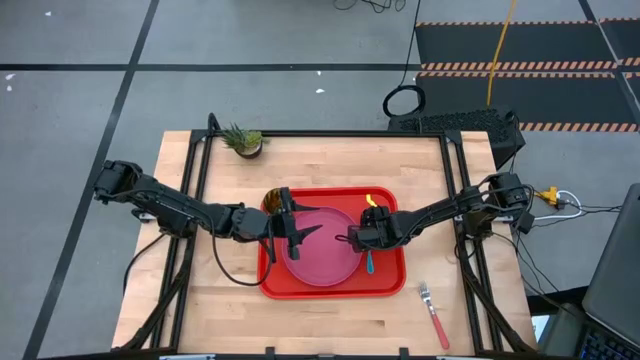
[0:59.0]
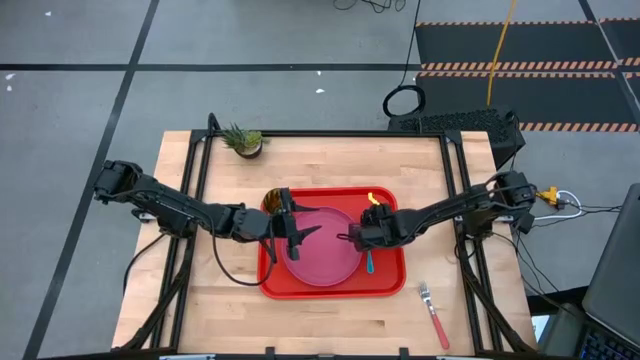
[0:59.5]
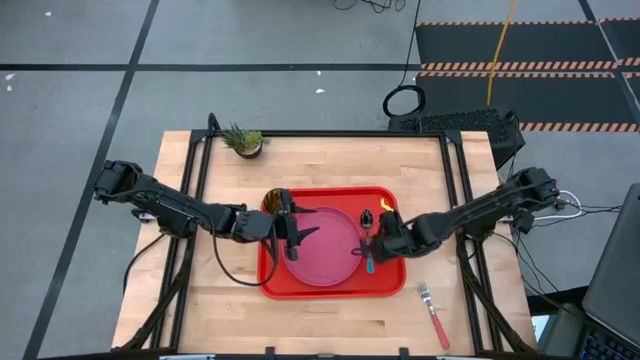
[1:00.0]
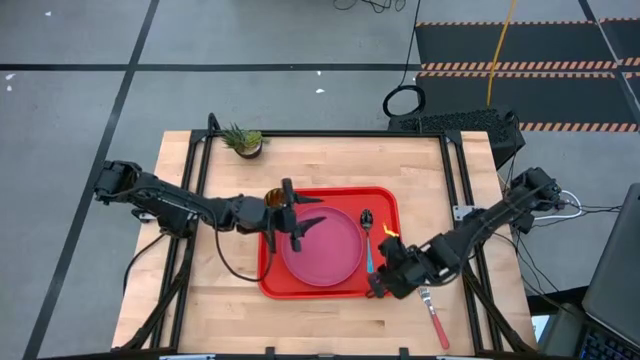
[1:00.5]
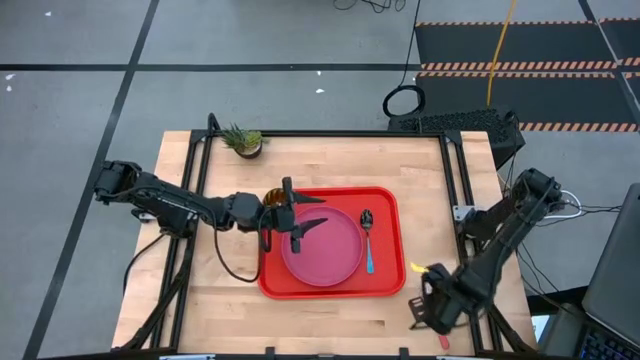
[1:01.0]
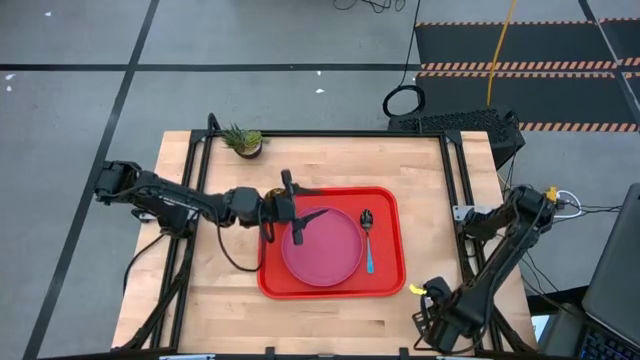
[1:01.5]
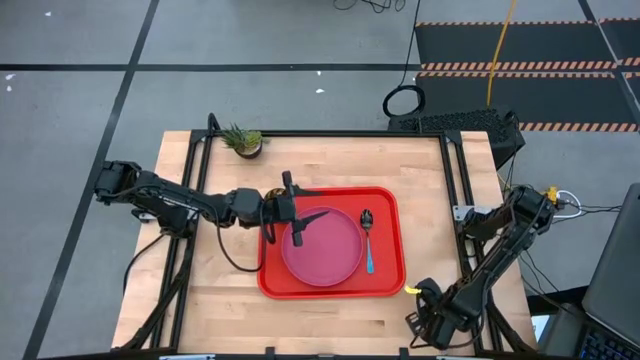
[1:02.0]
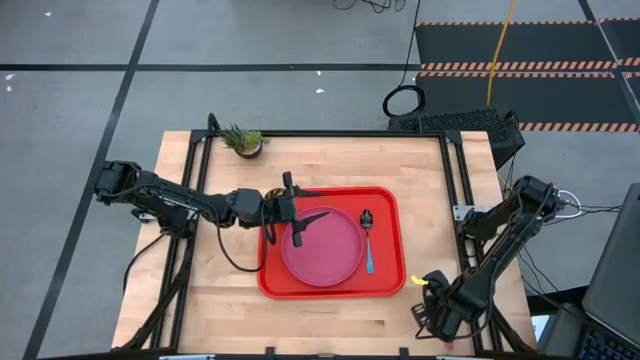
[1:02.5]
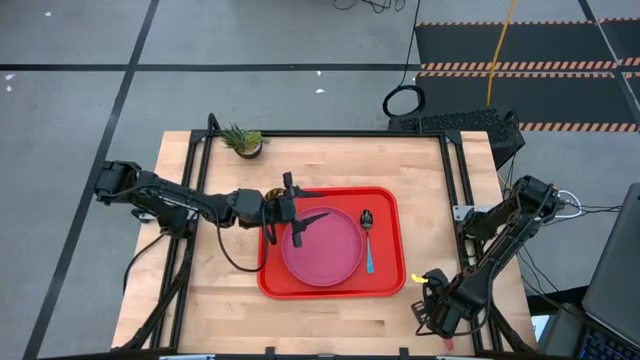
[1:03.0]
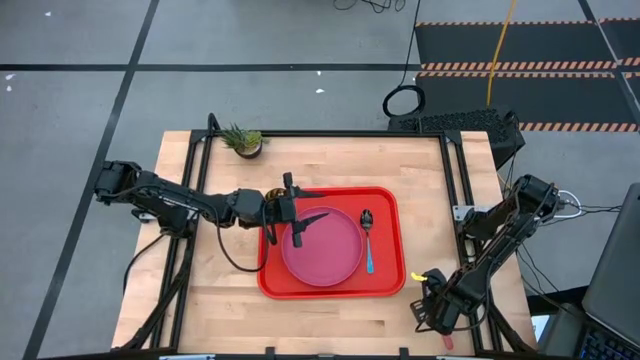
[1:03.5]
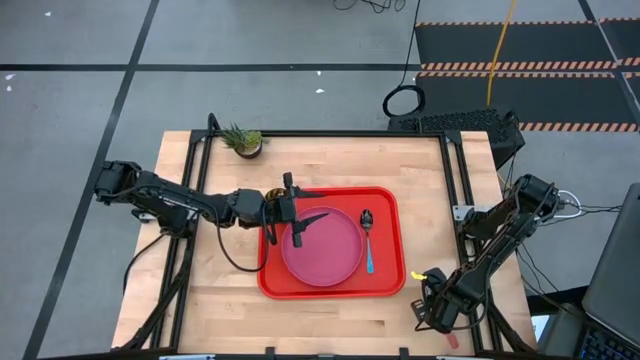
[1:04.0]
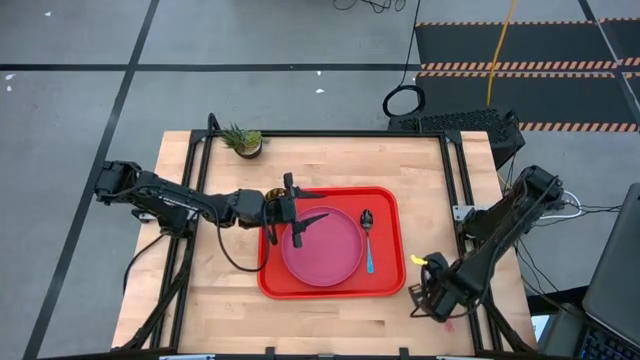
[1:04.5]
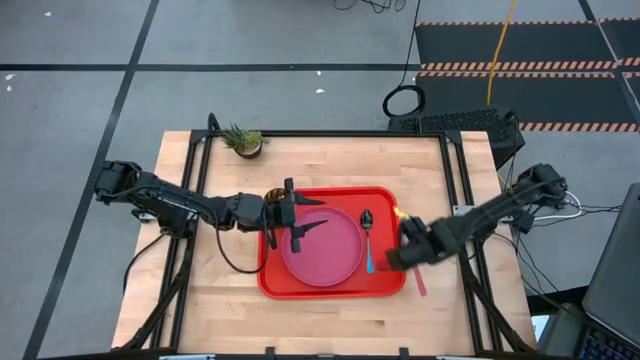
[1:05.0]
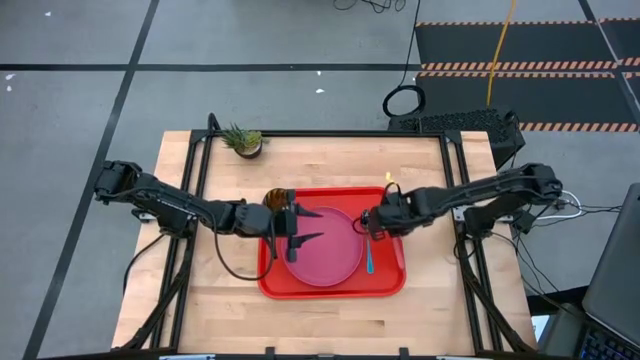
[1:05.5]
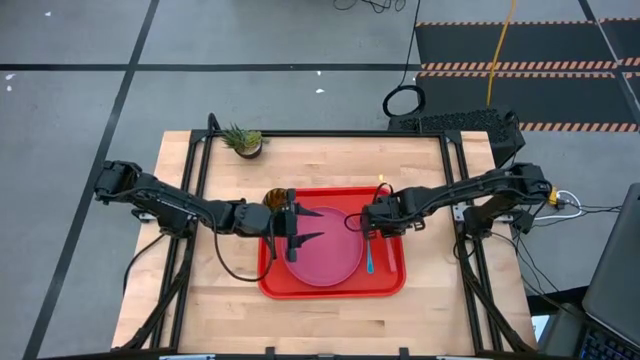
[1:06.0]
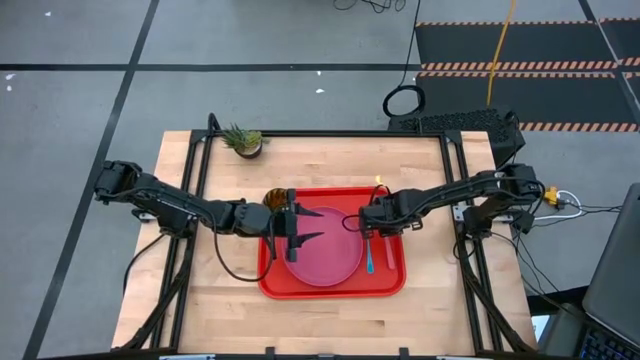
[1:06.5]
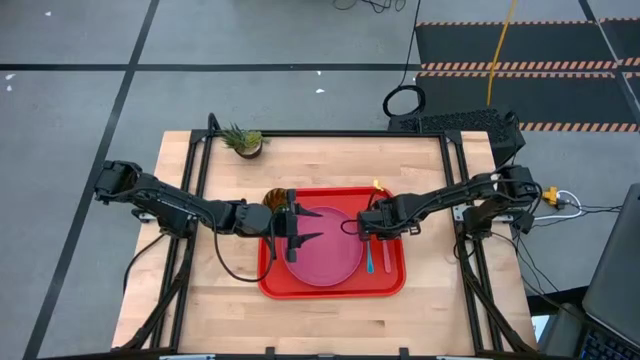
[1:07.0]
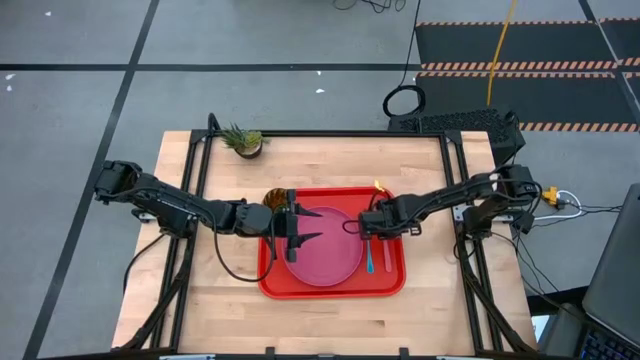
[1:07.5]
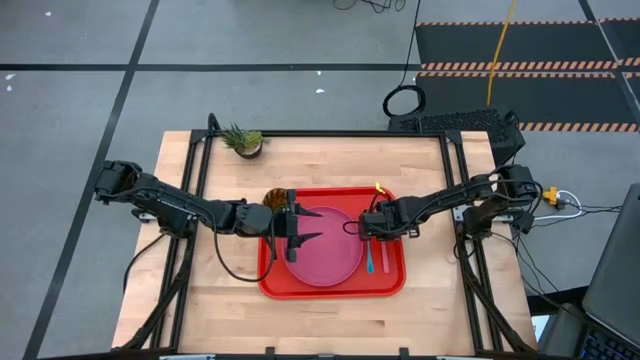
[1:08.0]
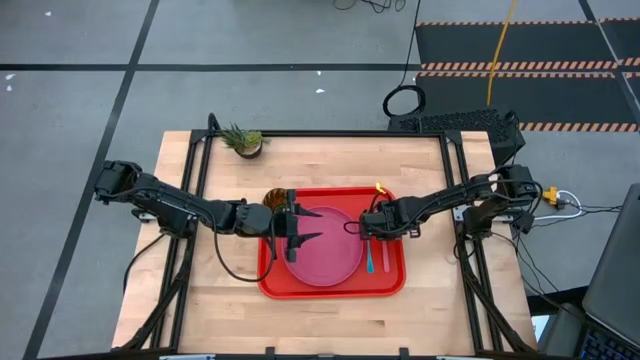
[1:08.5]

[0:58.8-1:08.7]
Task: Pick and place plate/cup/fork/spoon on tray
Put the pink fork on the red serving tray to the right of the blue spoon

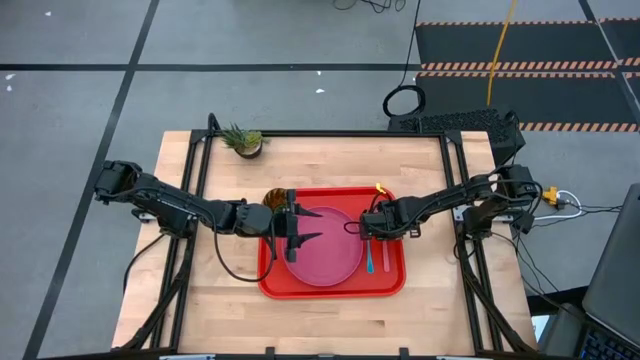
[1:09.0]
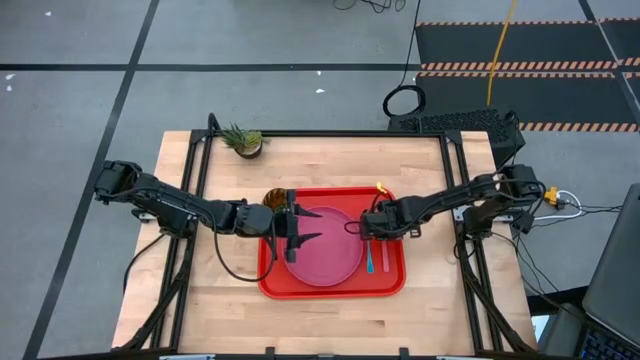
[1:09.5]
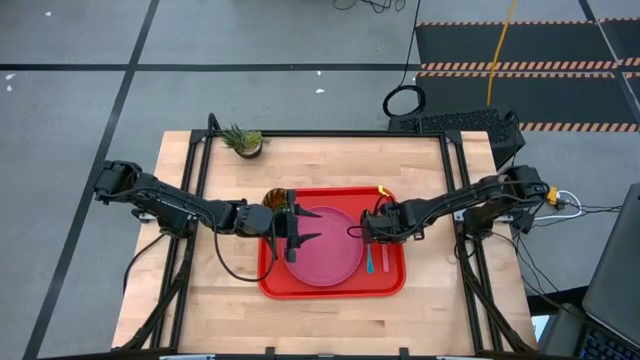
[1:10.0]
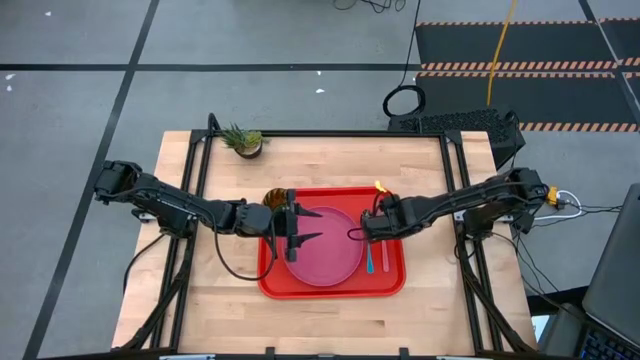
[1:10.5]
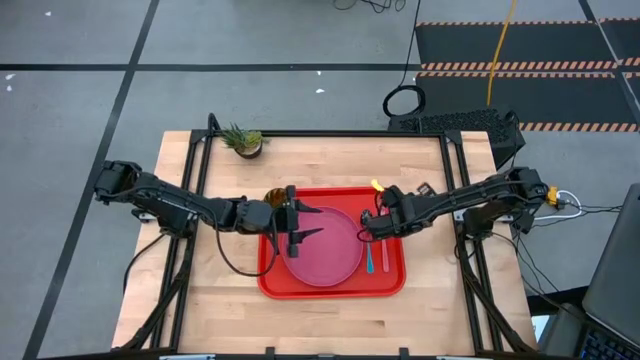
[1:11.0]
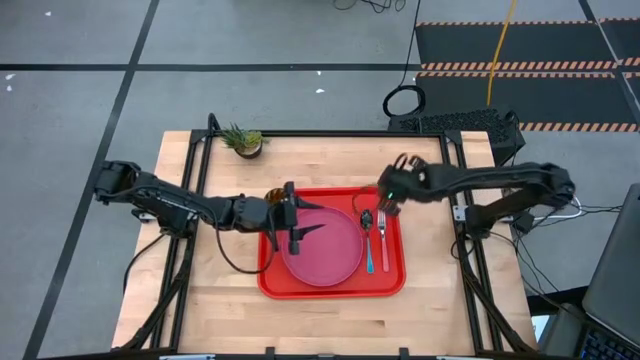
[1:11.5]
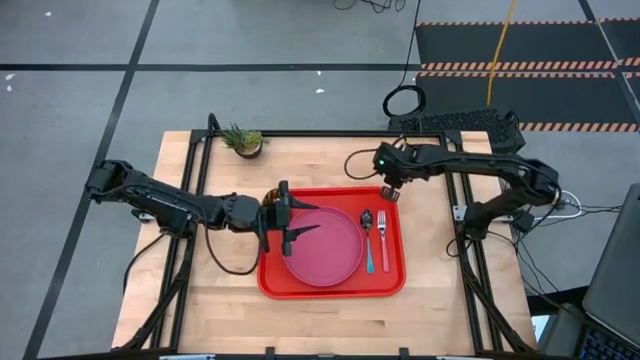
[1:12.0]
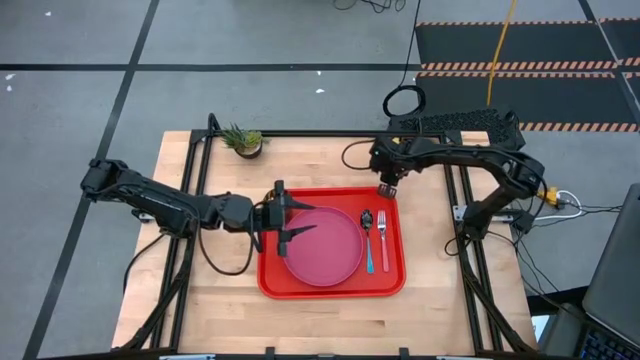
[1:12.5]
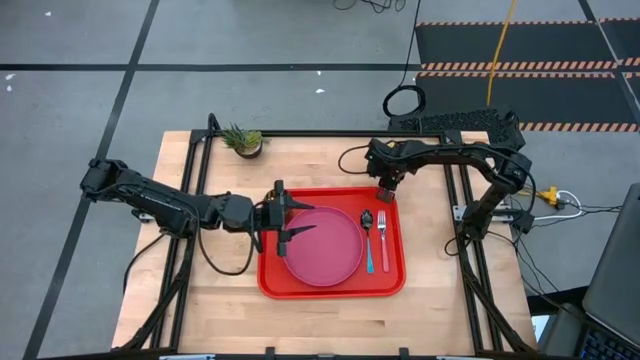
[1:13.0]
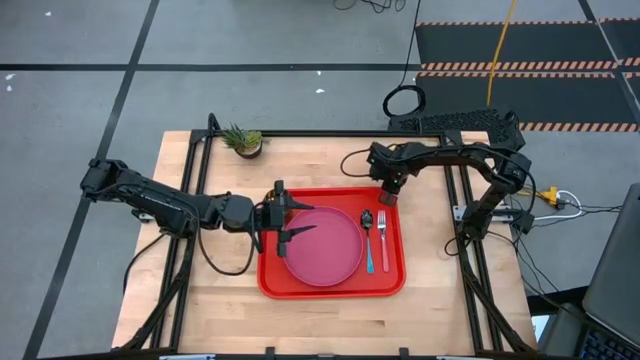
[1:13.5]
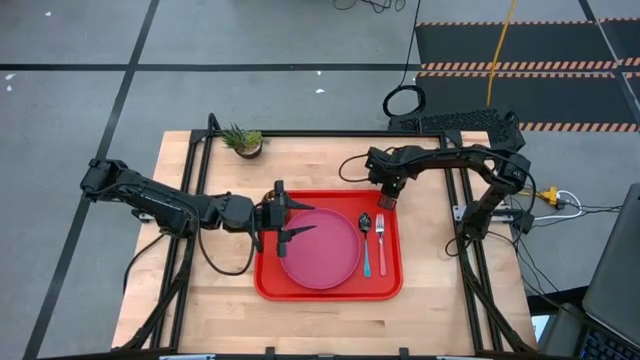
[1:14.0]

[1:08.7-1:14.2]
Adjust the serving tray

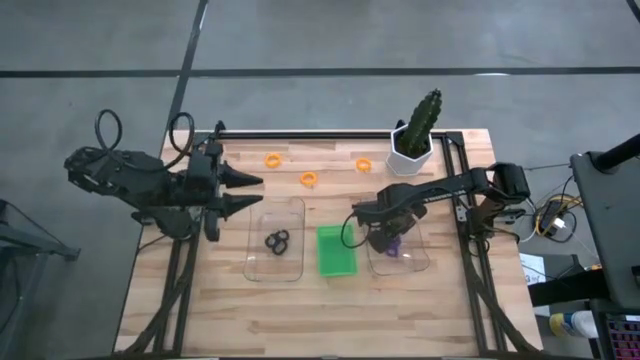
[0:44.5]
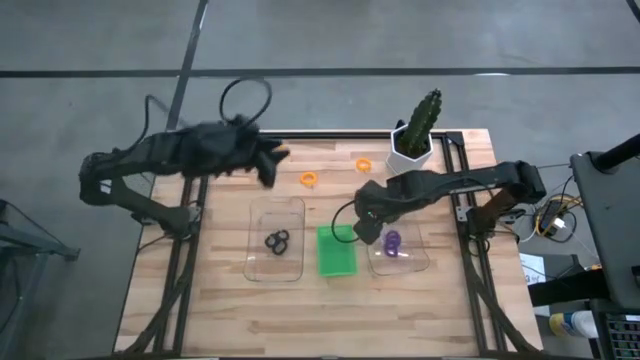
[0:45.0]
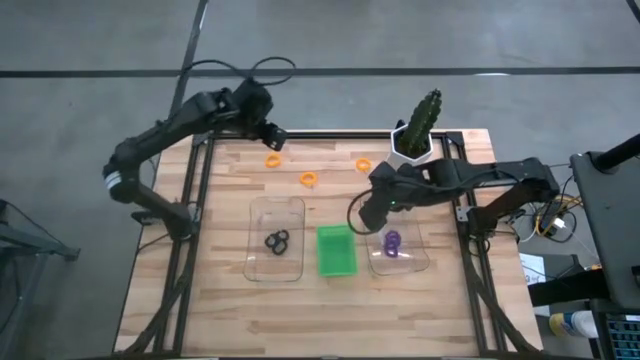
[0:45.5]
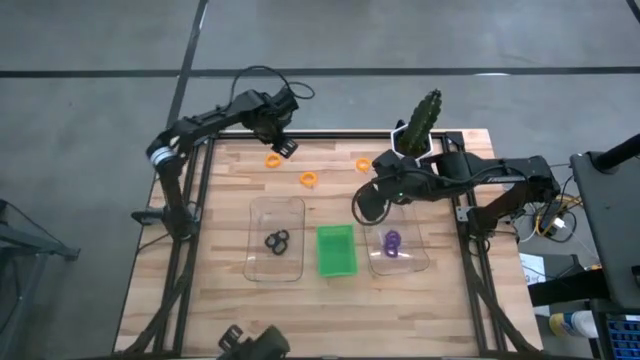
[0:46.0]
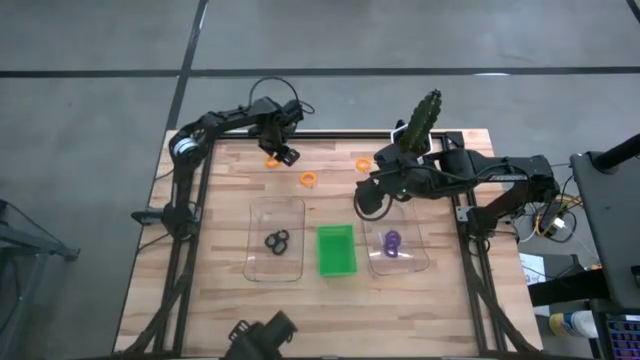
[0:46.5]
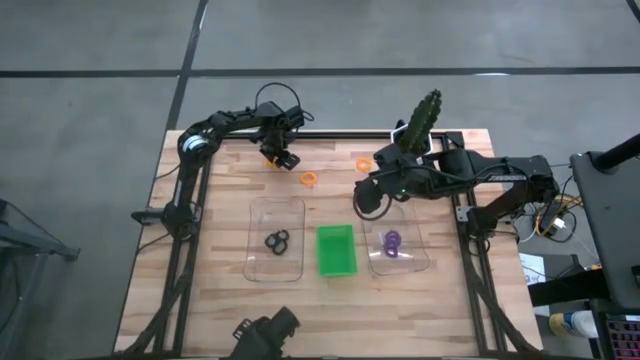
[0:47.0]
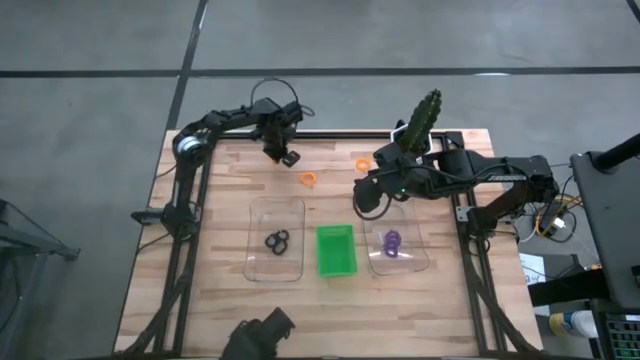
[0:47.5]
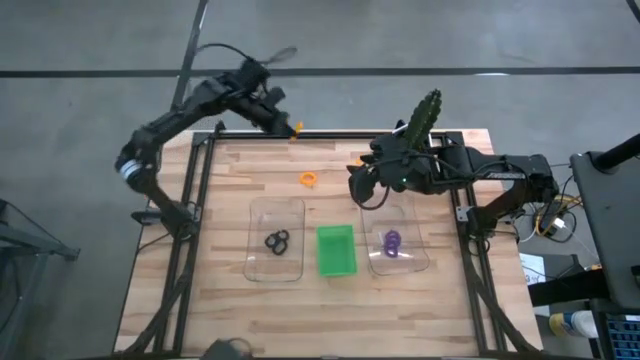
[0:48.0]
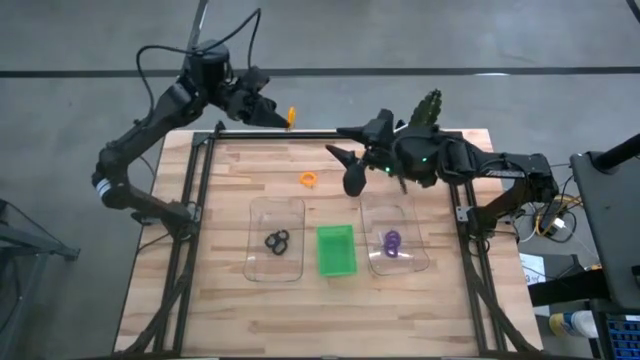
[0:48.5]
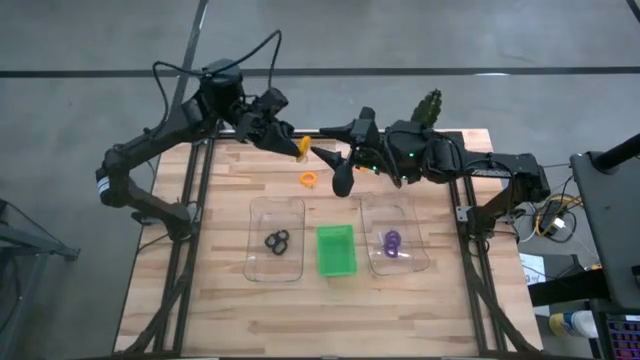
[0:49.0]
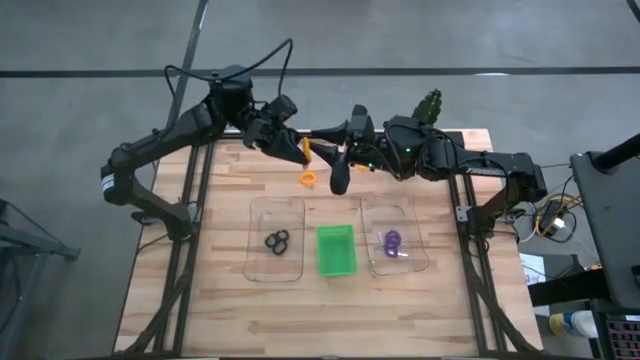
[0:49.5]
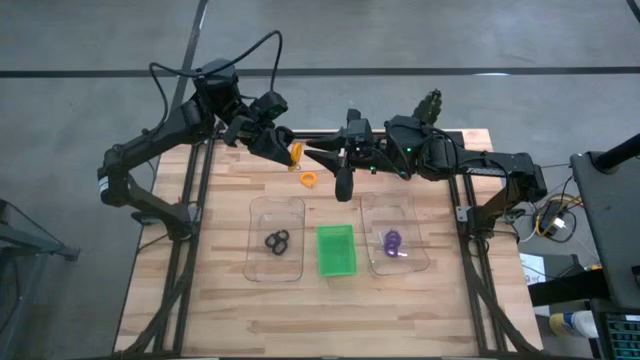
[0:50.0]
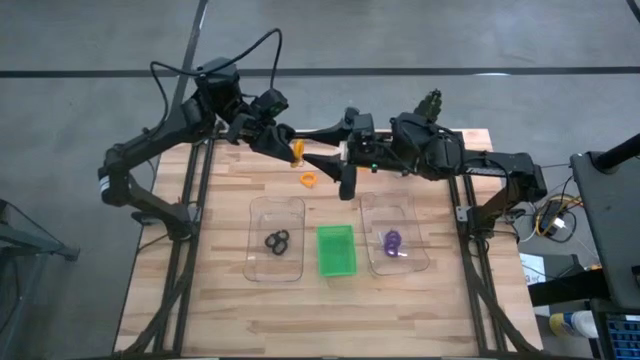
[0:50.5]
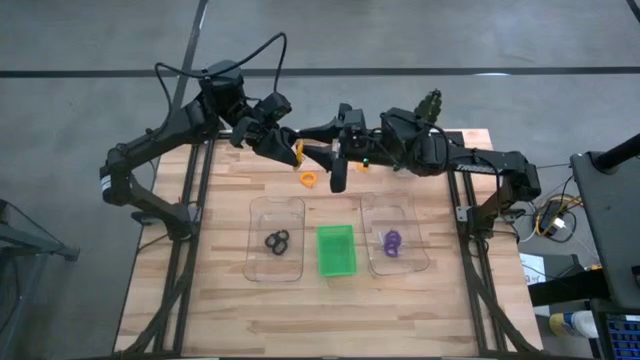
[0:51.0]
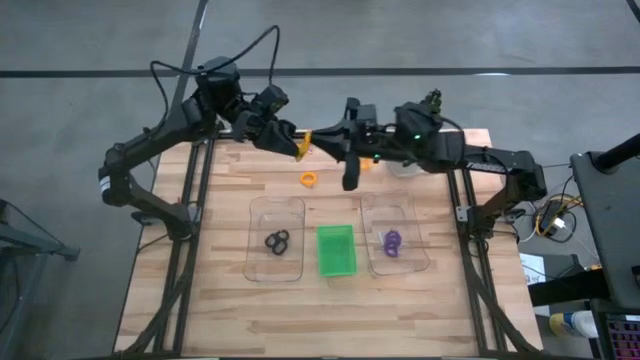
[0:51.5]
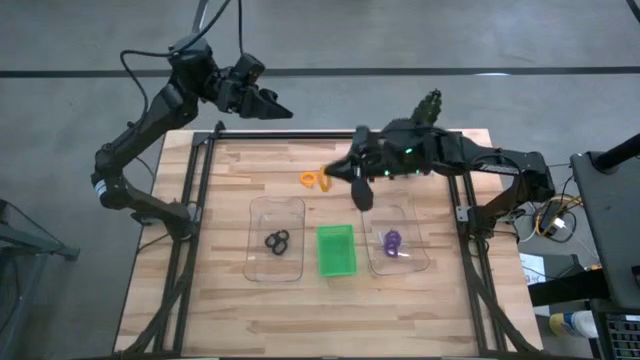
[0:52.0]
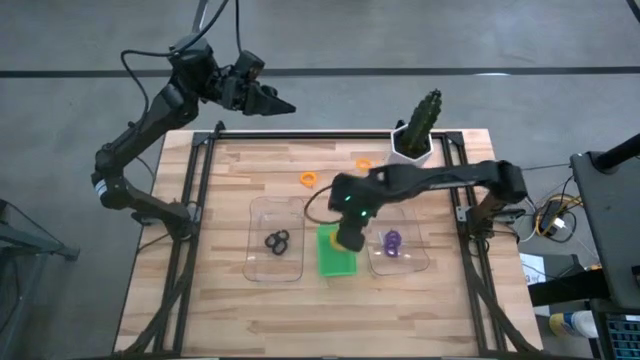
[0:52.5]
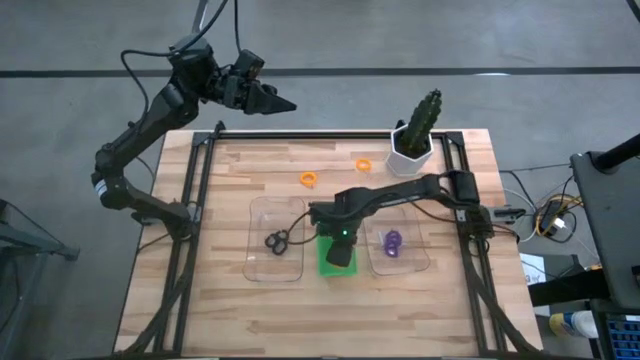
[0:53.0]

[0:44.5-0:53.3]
Task: Sort spring keychains
Put the left yellow spring keychain into the green bin
